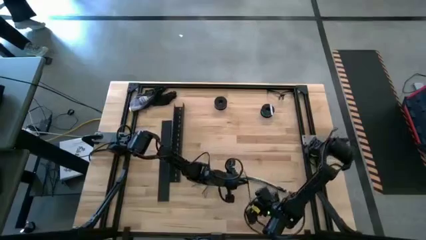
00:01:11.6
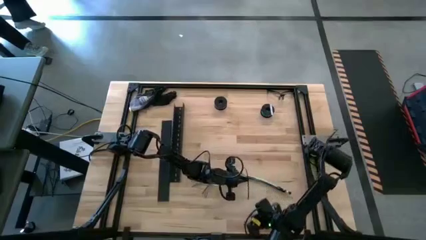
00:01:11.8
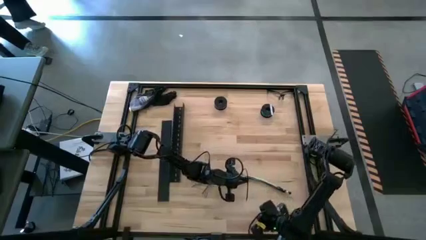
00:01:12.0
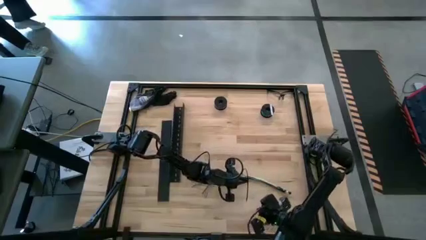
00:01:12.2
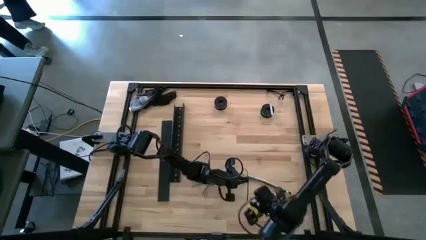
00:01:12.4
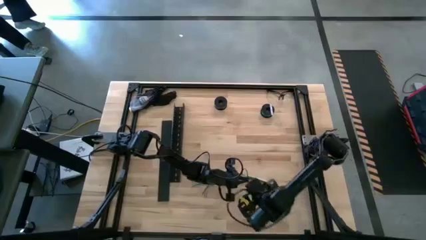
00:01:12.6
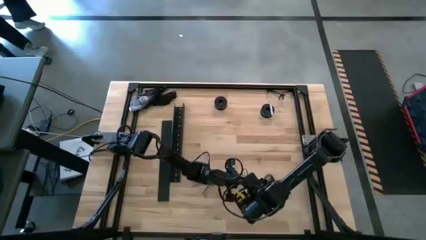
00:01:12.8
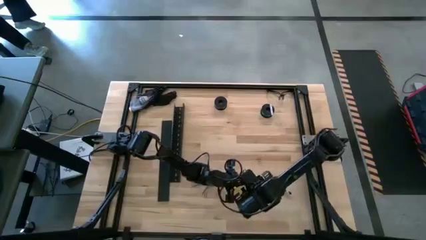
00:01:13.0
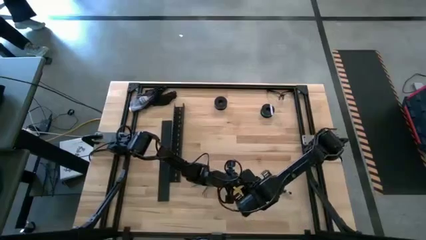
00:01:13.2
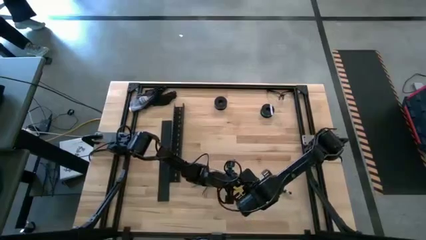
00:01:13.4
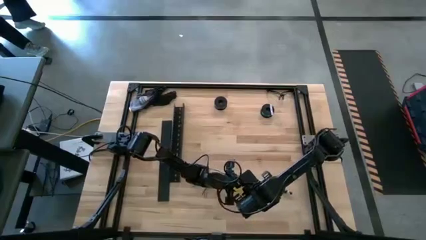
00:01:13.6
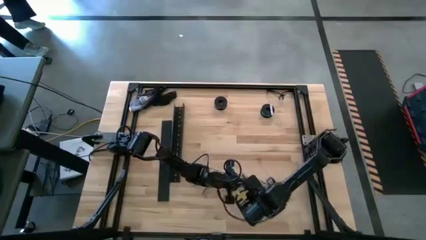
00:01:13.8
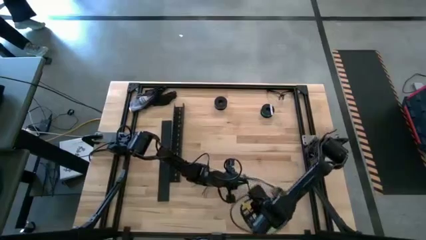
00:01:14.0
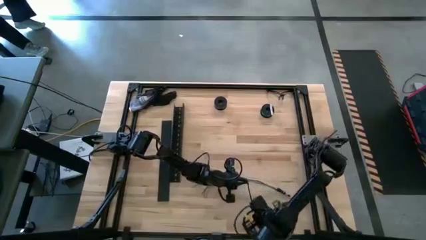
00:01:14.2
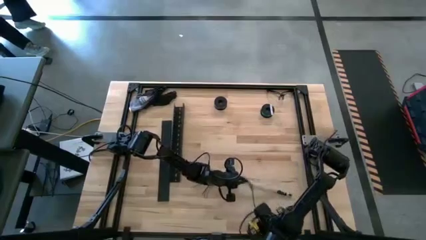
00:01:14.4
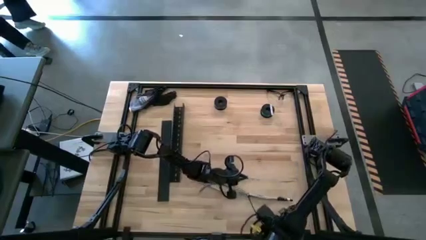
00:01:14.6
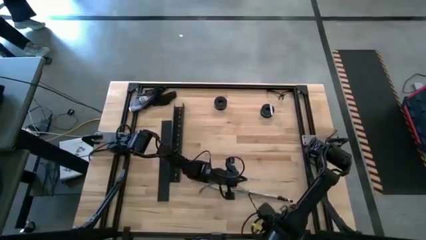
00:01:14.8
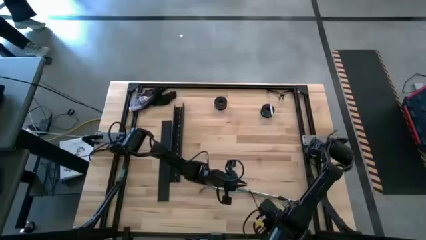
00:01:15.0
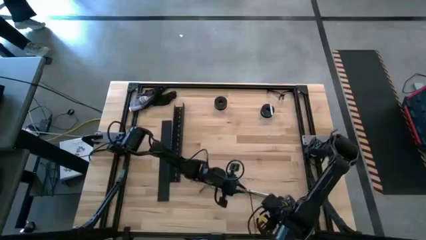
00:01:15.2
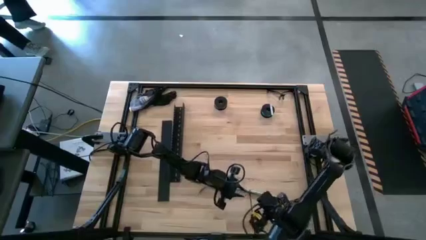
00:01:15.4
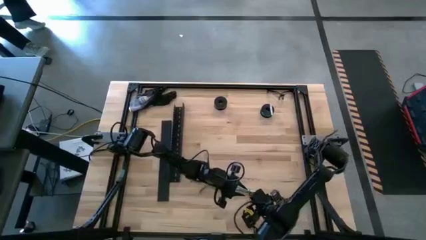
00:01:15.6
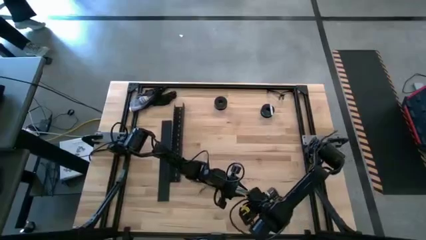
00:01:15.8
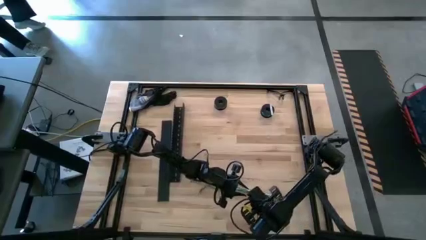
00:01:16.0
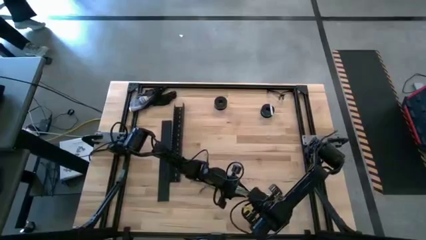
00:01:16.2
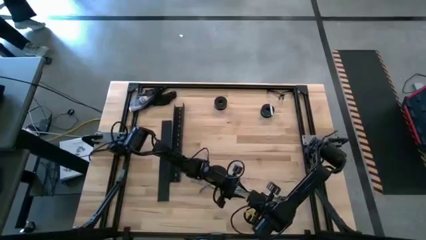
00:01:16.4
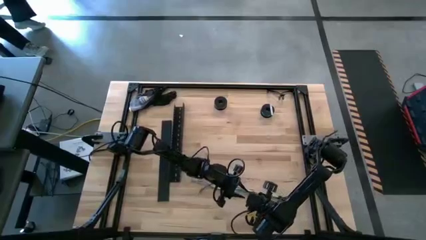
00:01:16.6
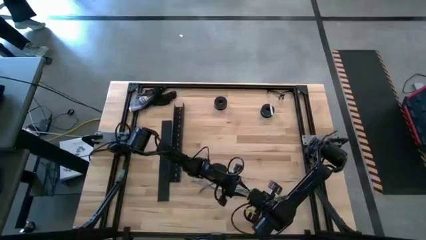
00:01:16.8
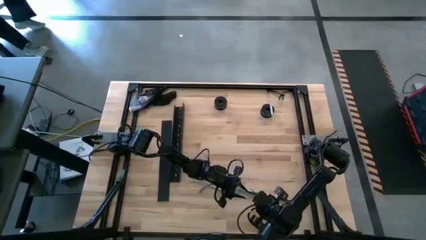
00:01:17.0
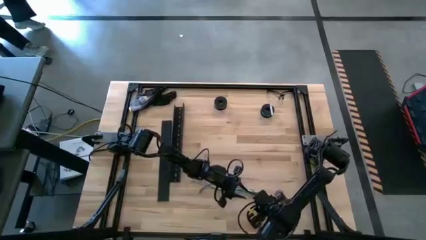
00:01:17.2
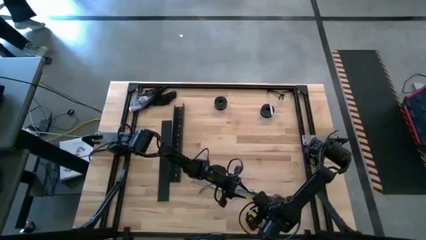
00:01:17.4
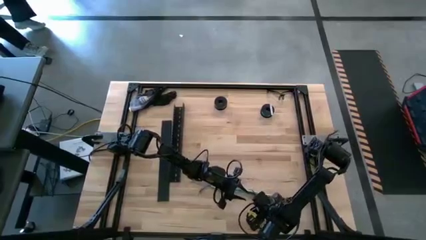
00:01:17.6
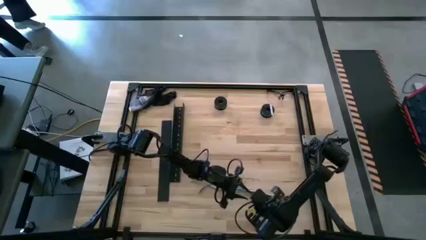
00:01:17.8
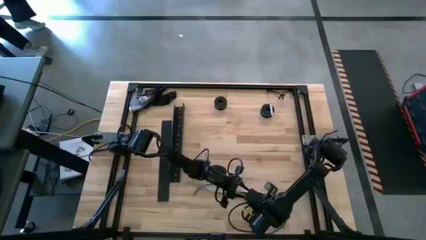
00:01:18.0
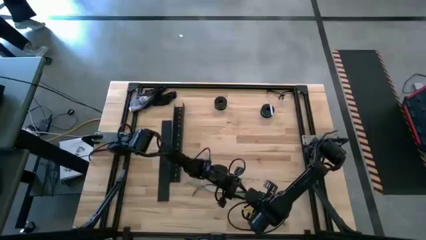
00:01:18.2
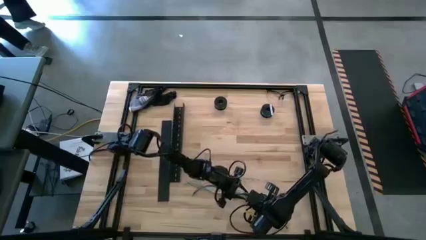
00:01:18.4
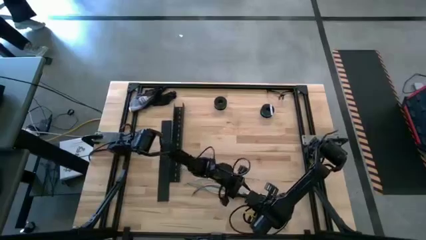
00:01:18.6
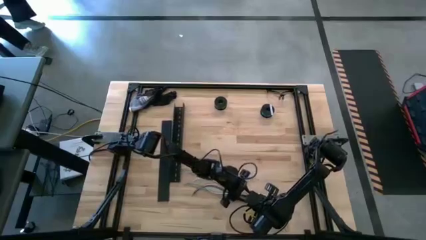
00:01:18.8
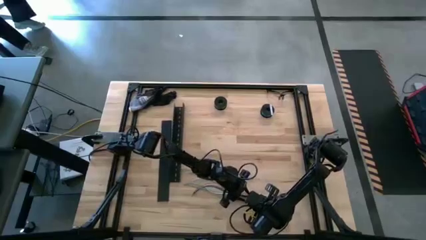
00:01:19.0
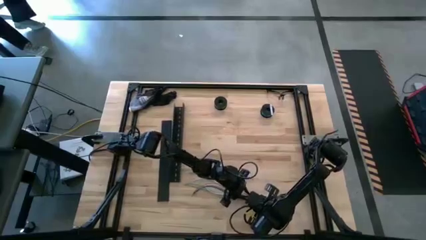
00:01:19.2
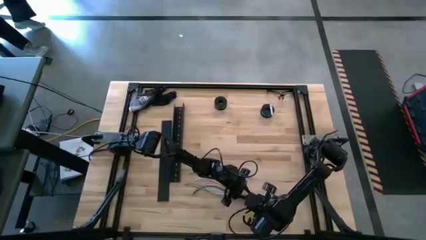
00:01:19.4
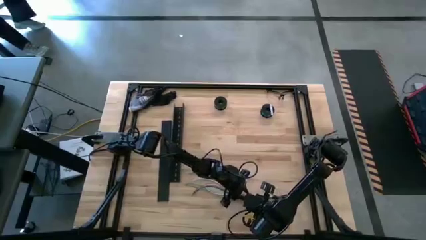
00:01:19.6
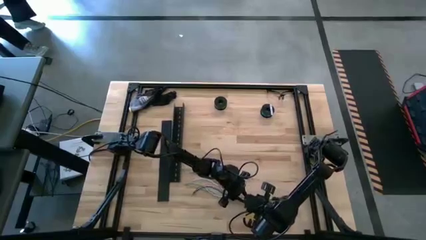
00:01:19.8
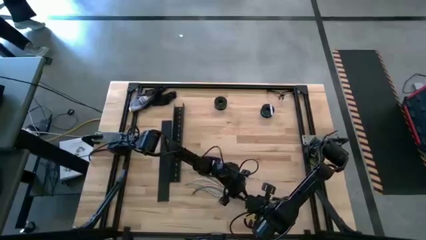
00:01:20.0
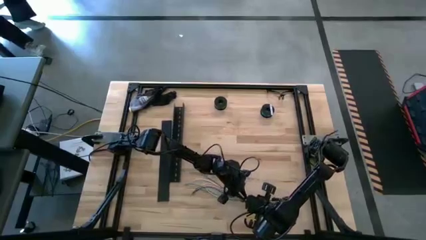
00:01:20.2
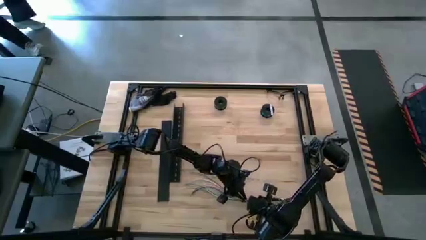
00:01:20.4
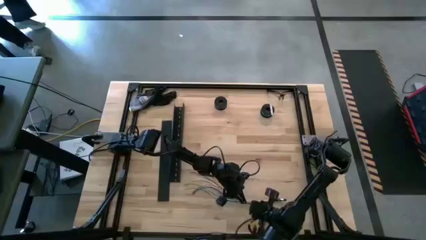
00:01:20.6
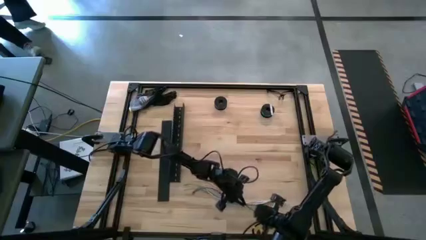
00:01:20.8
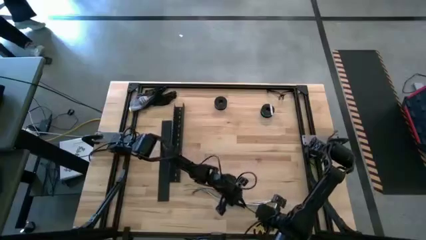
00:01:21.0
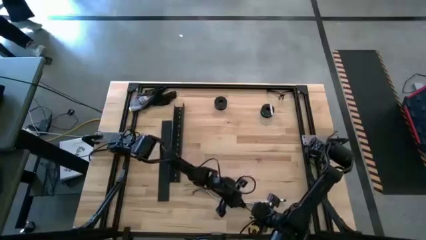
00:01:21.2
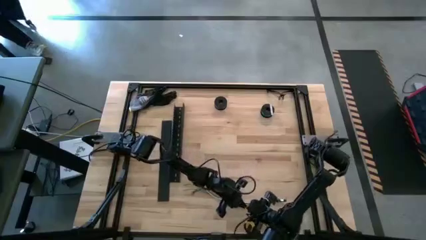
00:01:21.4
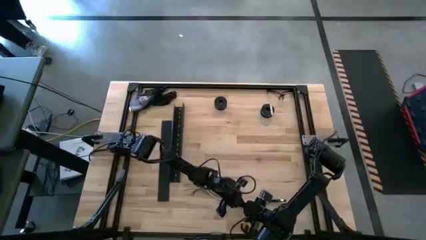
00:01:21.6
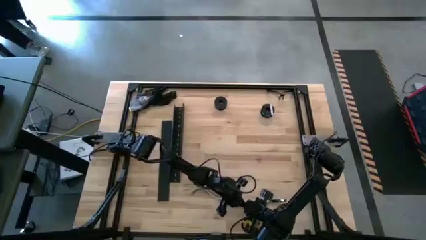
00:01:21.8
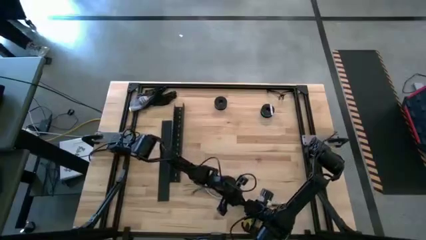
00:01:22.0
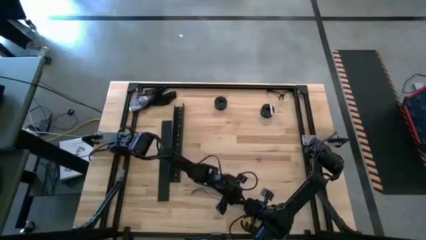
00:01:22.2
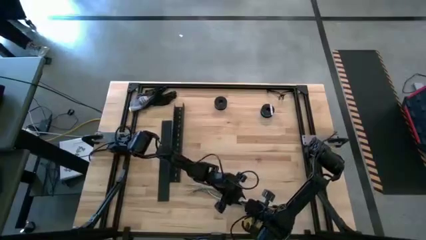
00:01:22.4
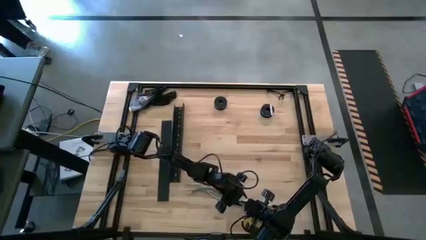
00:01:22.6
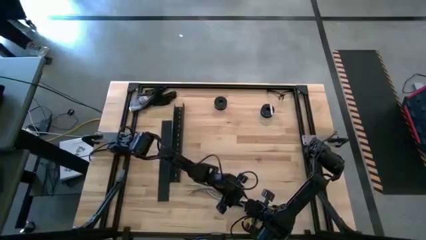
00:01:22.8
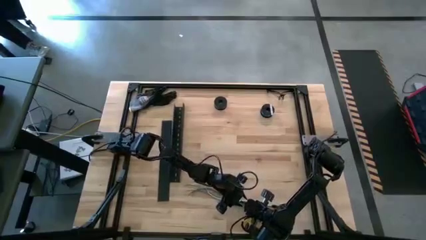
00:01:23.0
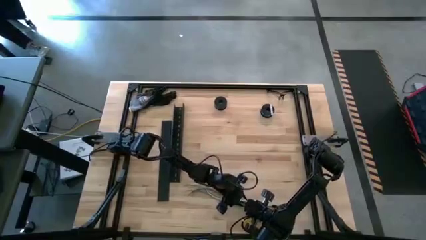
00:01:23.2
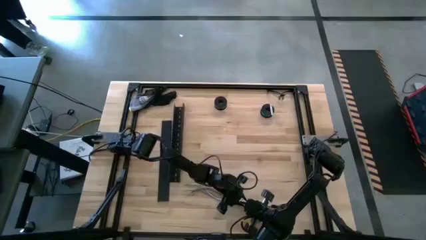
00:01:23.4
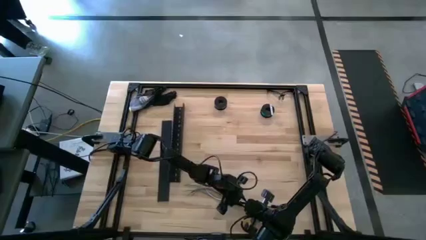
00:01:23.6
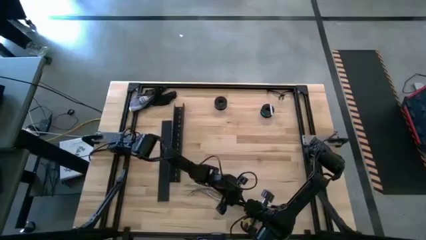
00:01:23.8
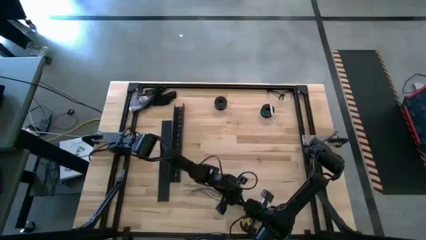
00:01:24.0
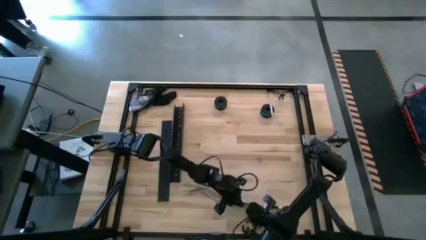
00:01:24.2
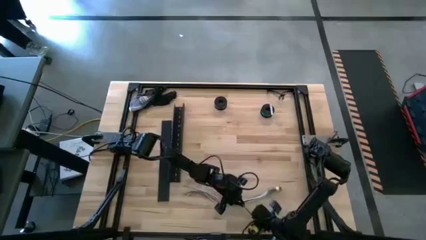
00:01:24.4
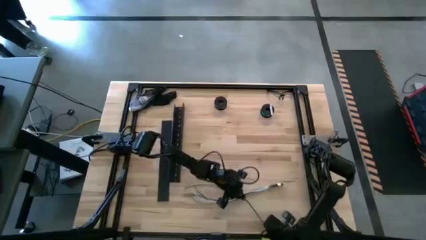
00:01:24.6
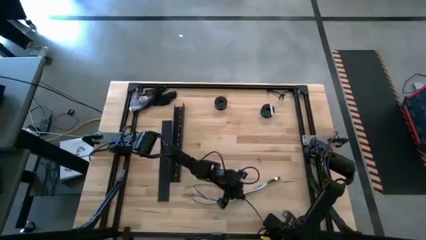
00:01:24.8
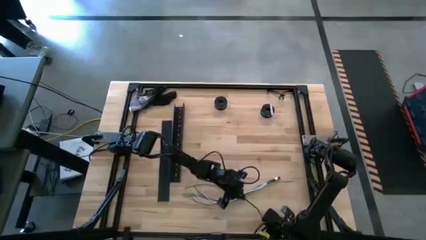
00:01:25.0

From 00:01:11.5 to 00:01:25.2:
Task: Ziptie cables
Wrap the black zip tie on the cable
